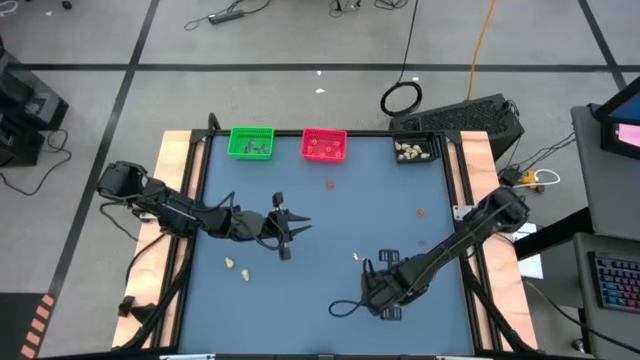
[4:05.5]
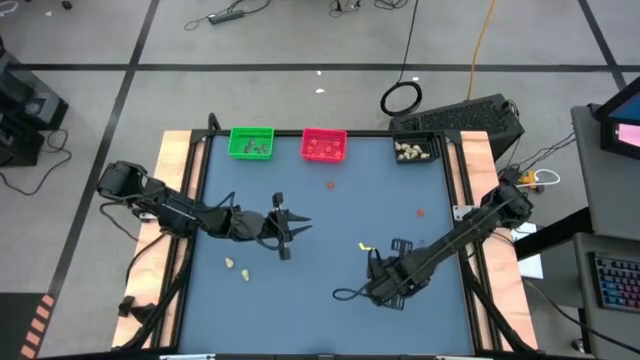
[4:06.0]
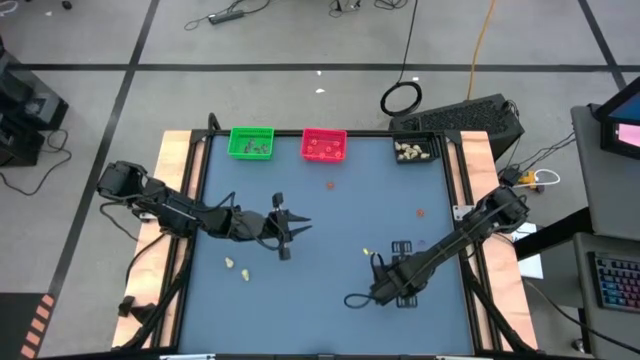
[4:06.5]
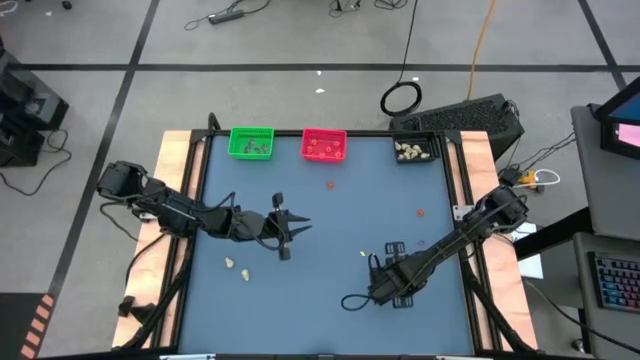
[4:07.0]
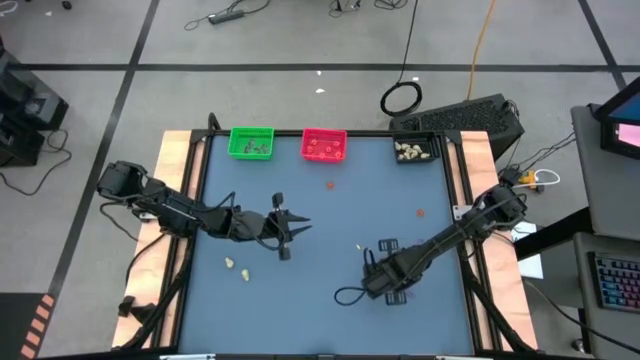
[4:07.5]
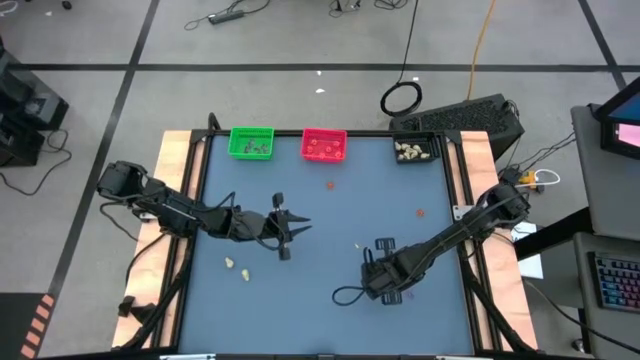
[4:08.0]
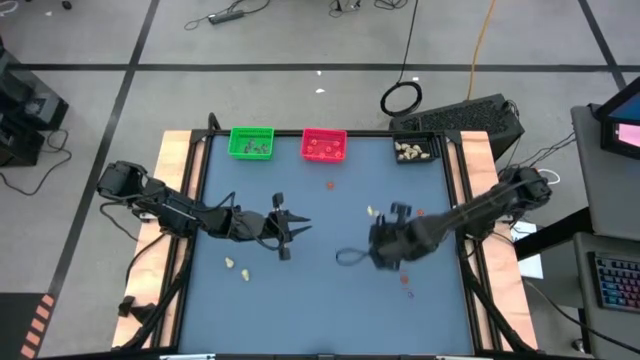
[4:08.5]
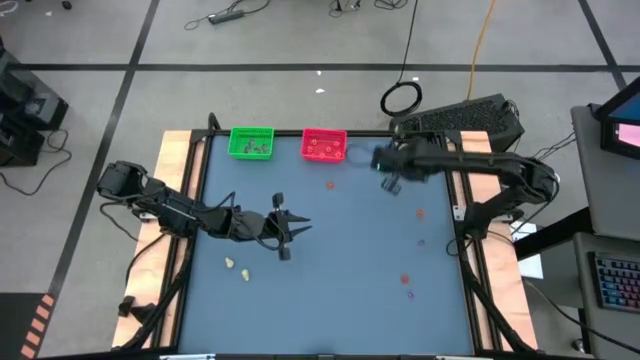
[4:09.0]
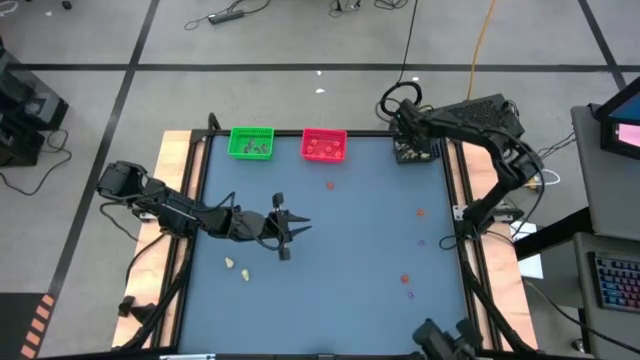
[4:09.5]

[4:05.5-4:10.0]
Task: Sort Halloween decoration
Put the white skull toy into the black bin

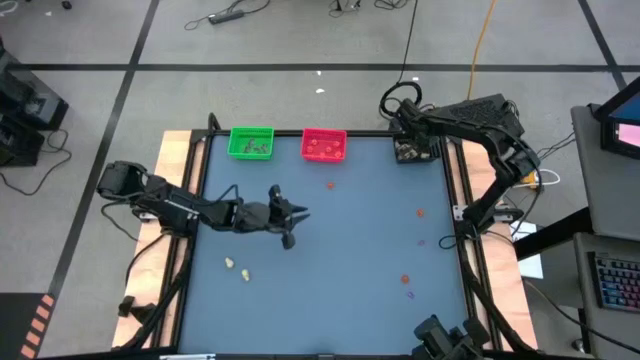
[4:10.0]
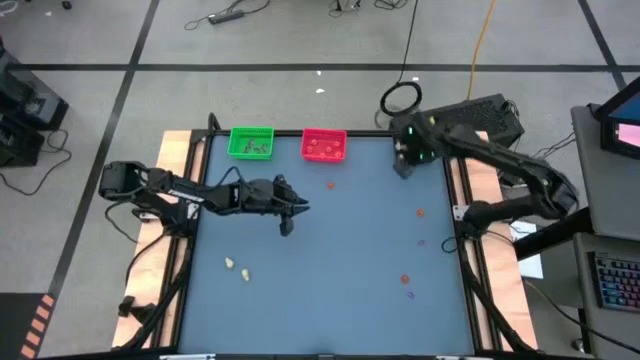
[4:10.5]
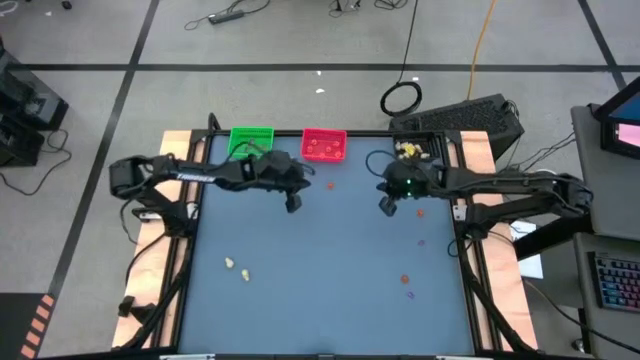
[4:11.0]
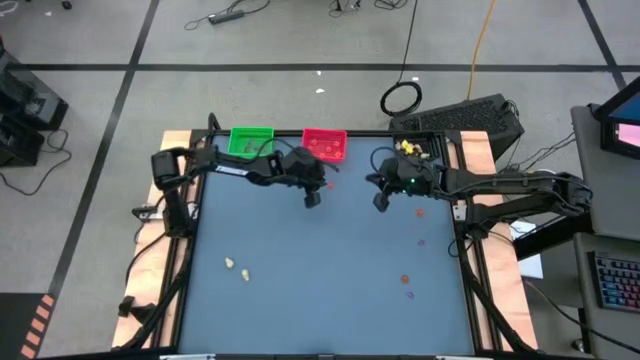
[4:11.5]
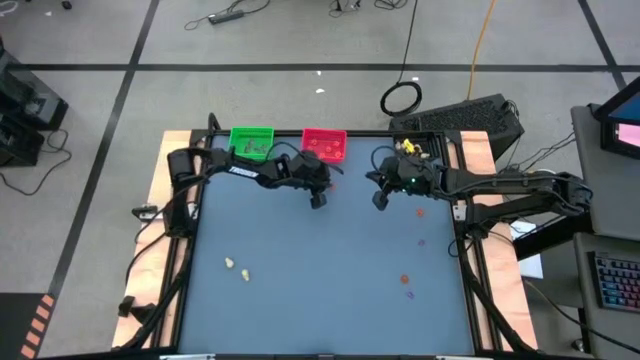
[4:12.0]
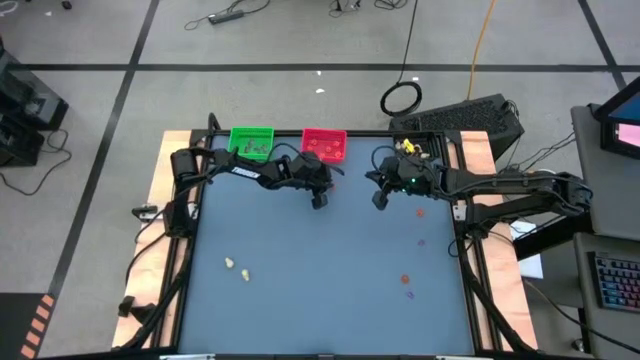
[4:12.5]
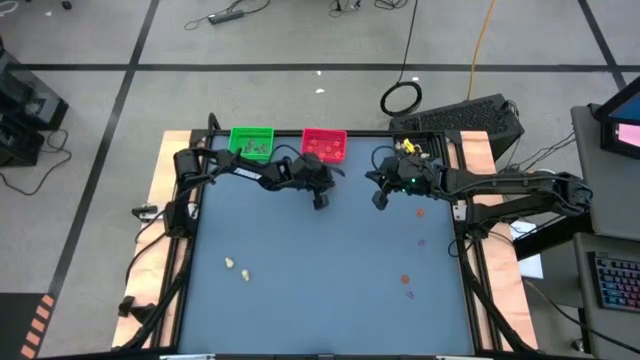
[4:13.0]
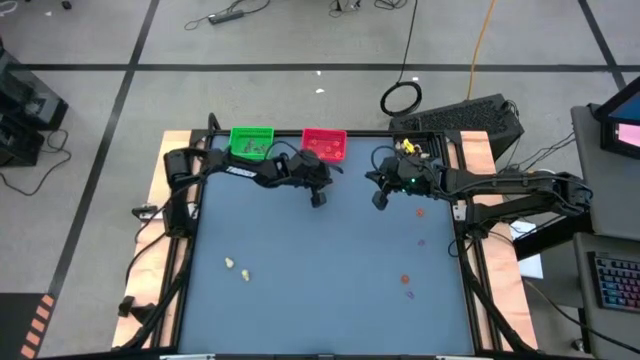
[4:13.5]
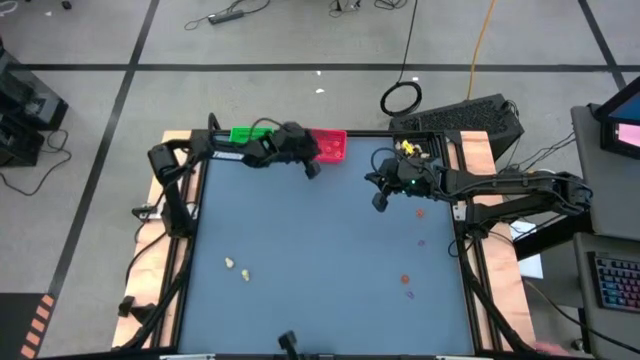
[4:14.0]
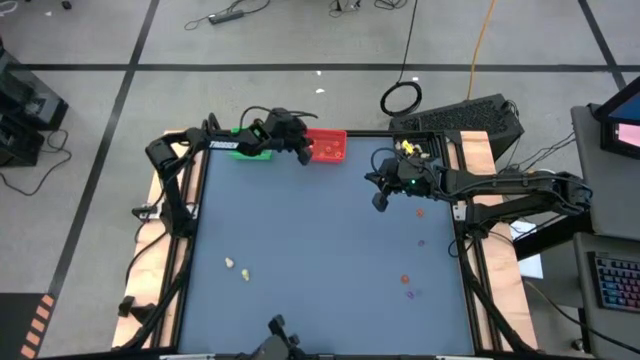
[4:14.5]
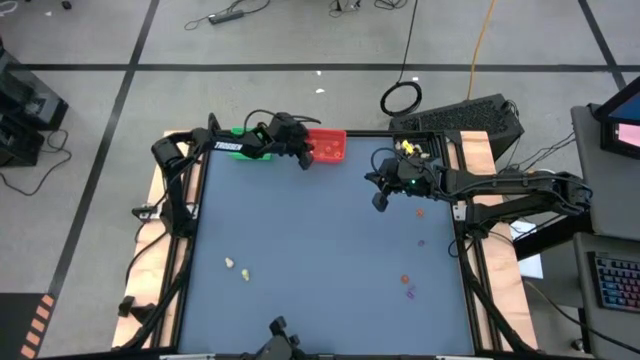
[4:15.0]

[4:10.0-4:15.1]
Put the orange pumpkin toy into the red bin

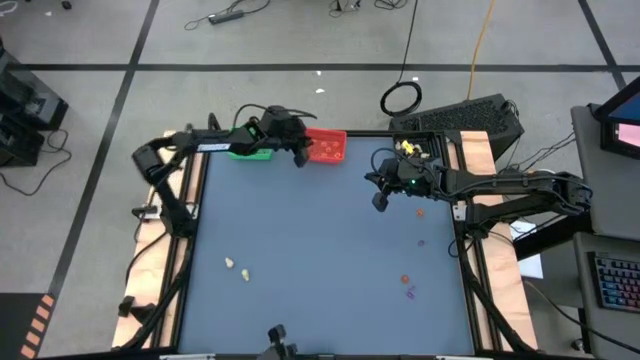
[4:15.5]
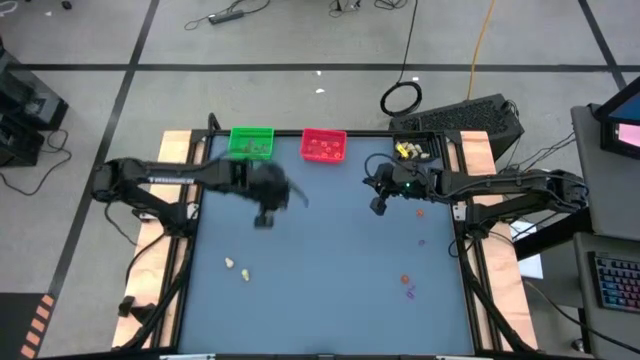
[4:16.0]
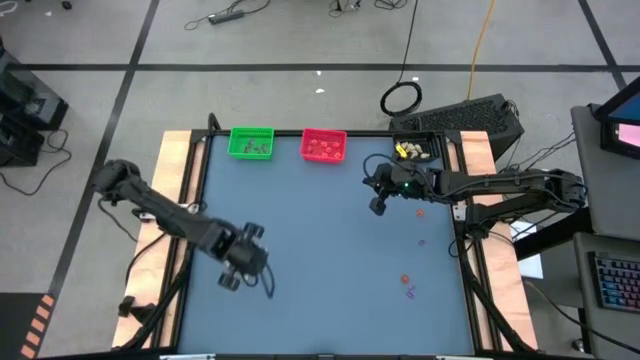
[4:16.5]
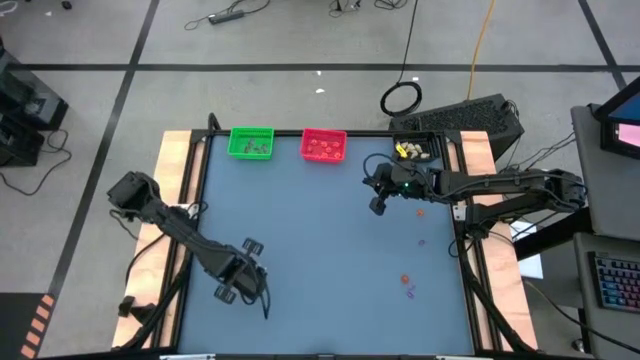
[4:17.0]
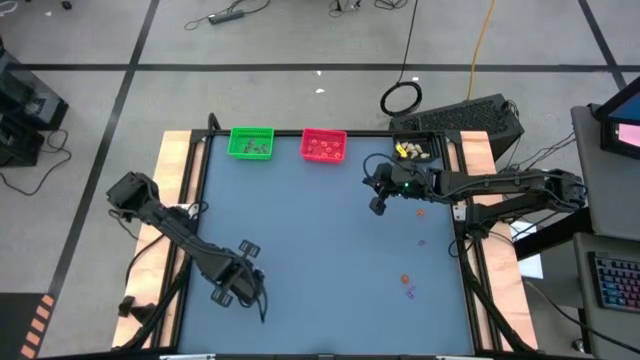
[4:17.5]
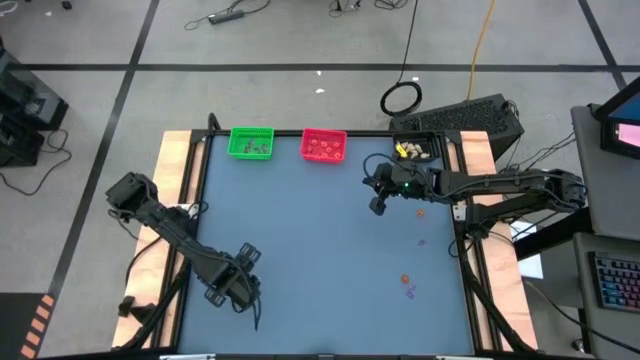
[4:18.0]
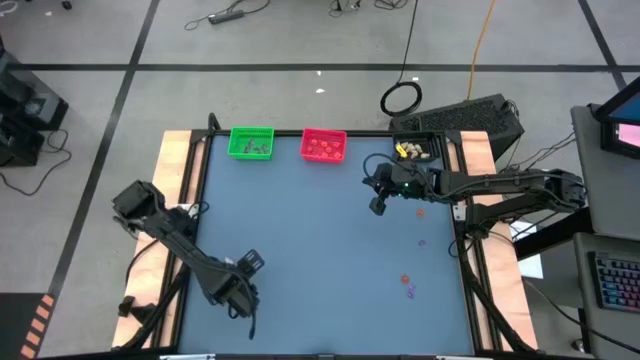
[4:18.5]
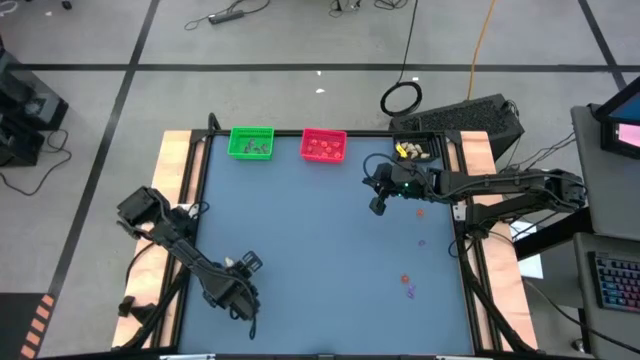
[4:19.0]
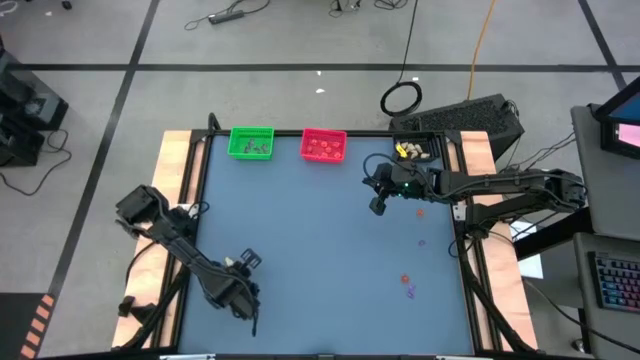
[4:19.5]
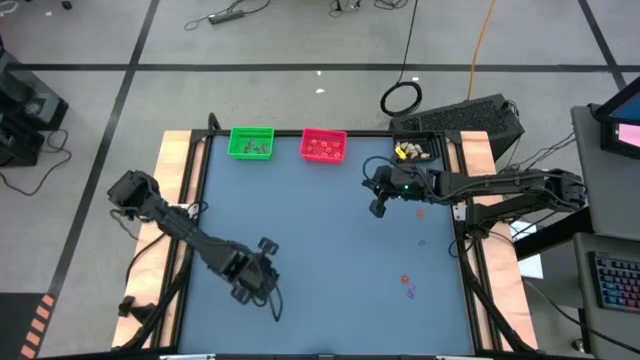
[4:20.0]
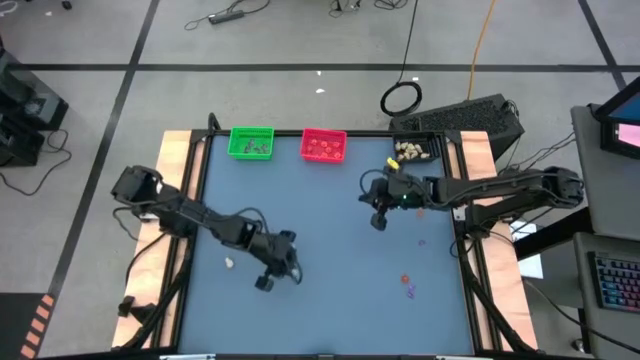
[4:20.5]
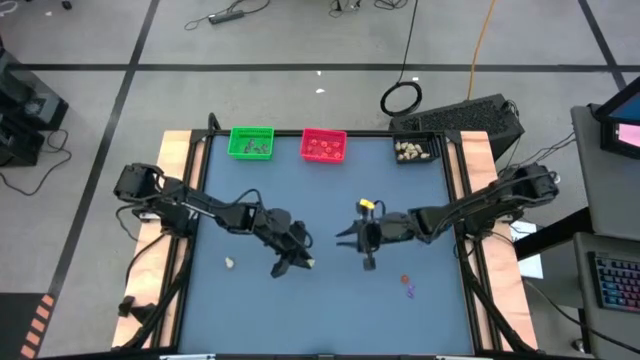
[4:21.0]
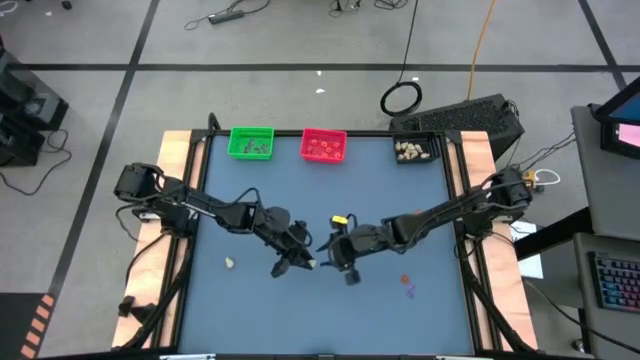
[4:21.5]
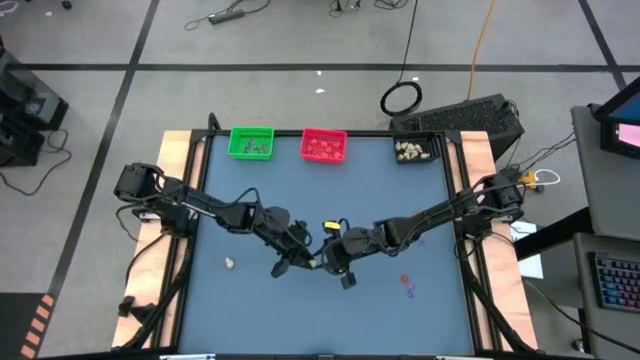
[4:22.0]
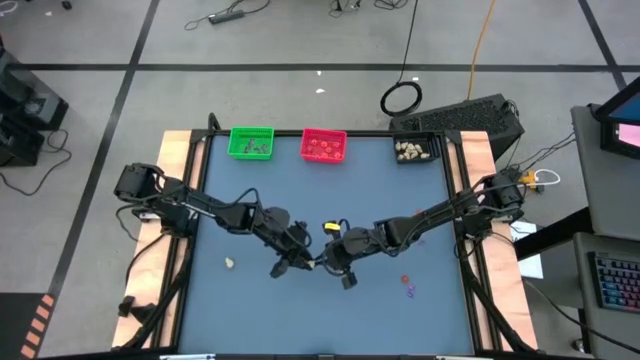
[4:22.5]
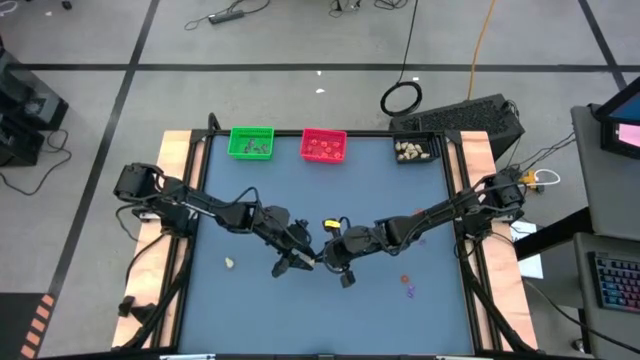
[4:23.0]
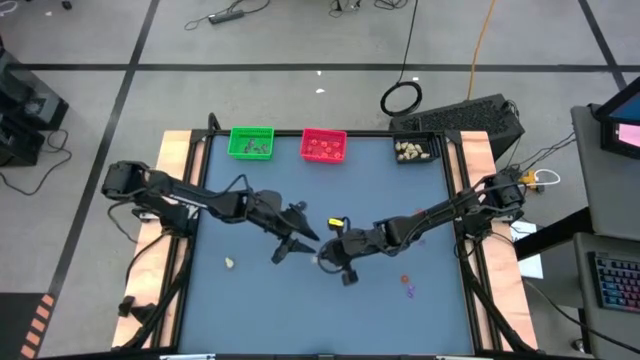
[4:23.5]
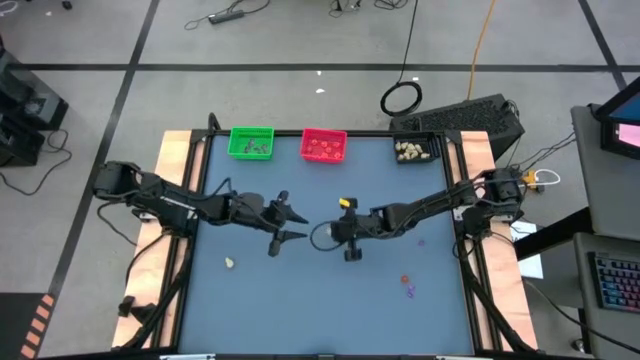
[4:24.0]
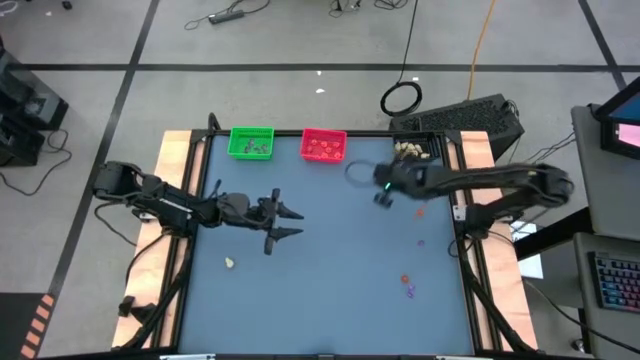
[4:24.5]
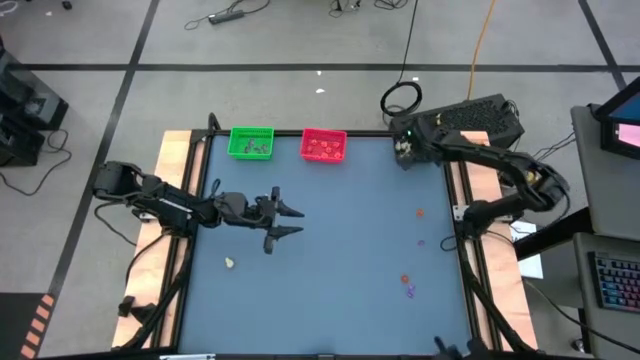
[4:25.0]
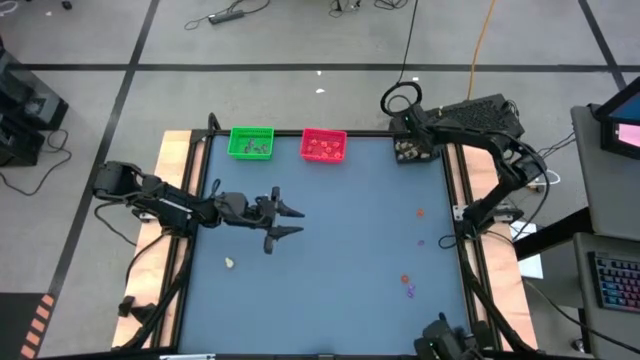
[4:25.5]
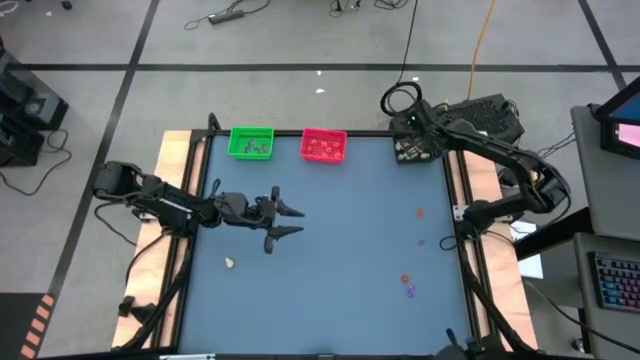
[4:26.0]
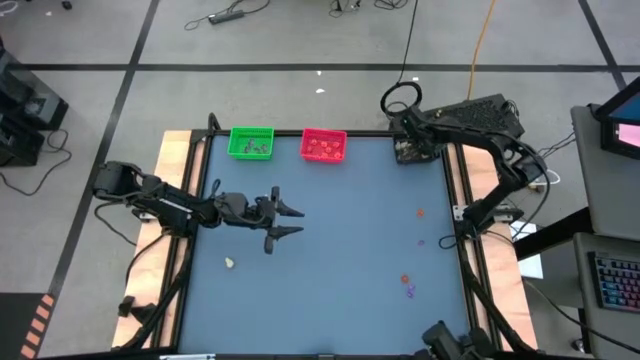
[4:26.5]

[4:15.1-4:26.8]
Put the white skull toy into the black bin
